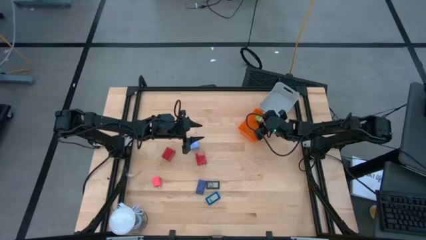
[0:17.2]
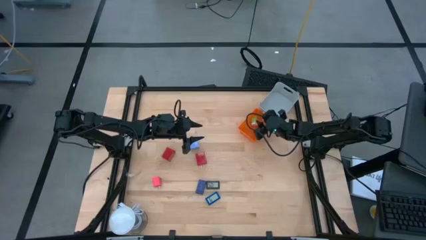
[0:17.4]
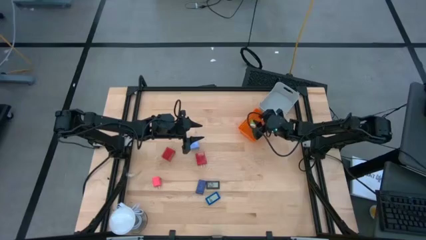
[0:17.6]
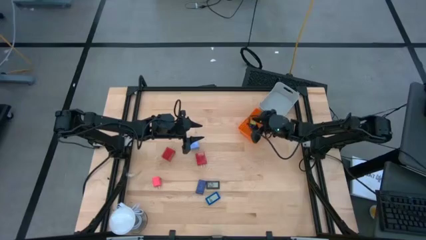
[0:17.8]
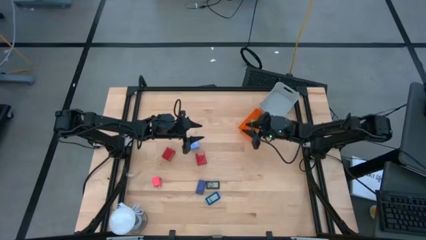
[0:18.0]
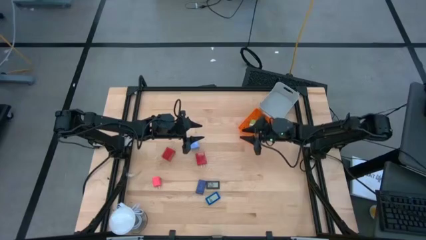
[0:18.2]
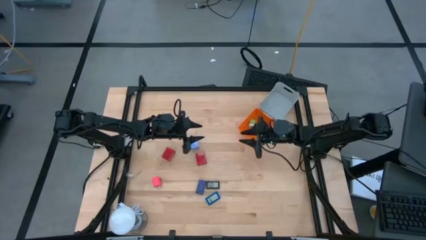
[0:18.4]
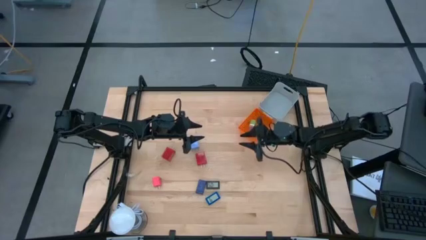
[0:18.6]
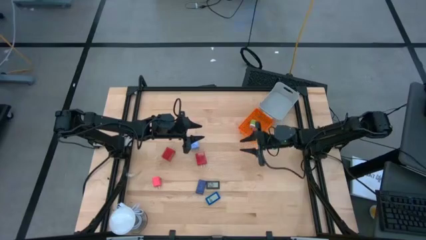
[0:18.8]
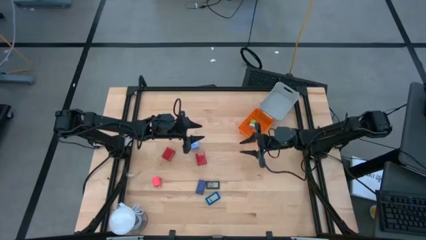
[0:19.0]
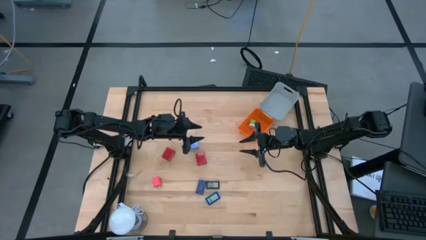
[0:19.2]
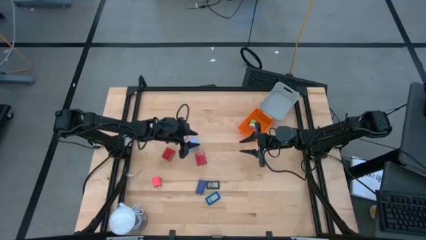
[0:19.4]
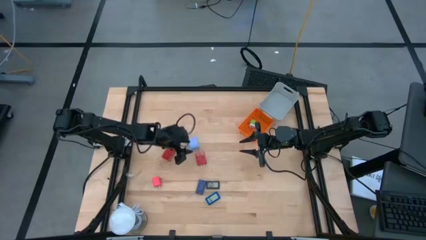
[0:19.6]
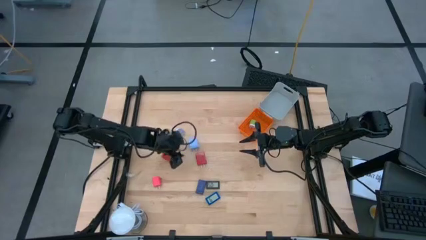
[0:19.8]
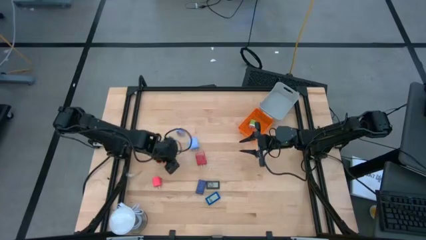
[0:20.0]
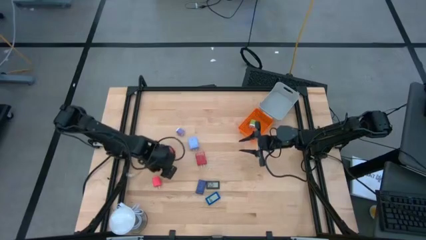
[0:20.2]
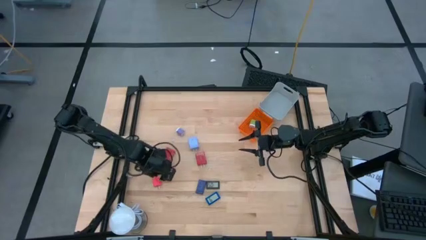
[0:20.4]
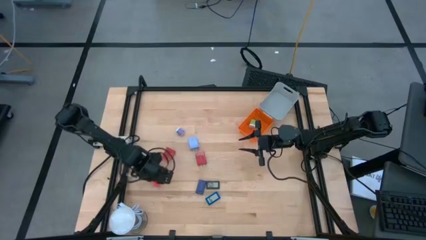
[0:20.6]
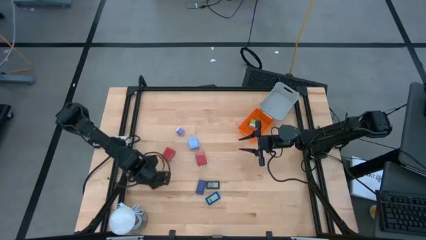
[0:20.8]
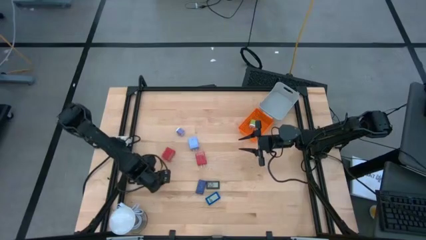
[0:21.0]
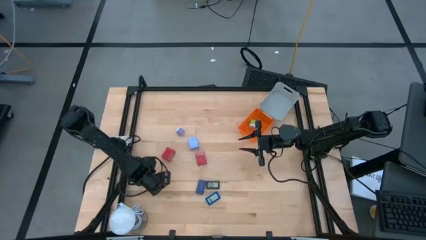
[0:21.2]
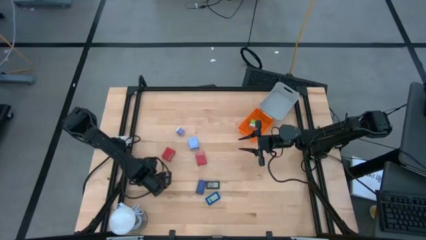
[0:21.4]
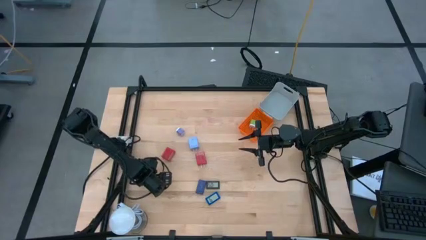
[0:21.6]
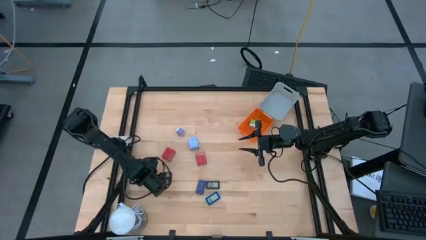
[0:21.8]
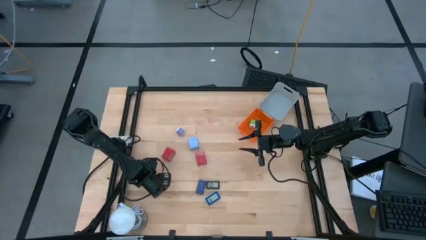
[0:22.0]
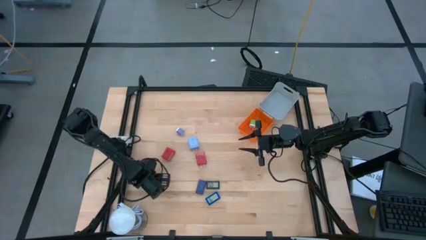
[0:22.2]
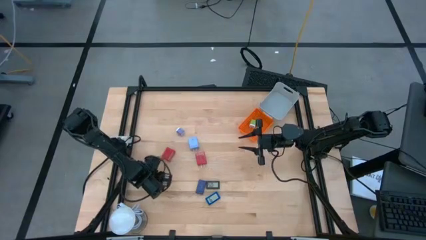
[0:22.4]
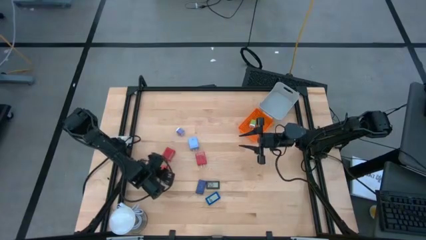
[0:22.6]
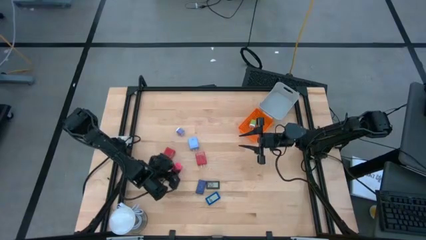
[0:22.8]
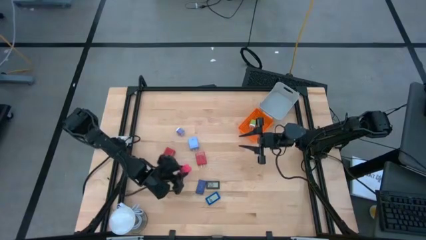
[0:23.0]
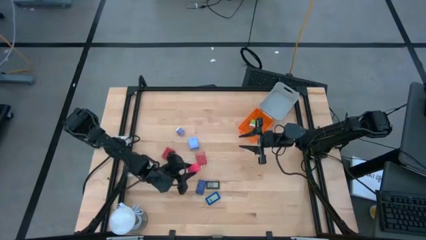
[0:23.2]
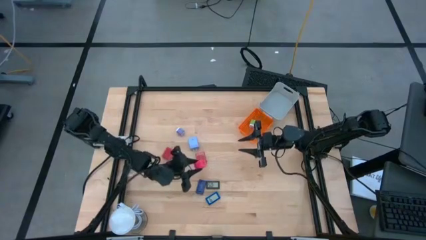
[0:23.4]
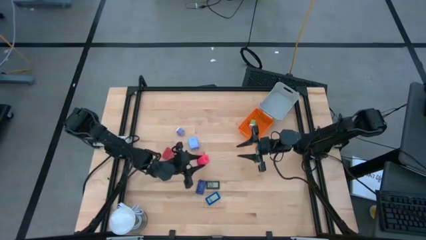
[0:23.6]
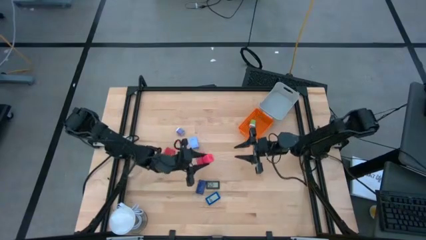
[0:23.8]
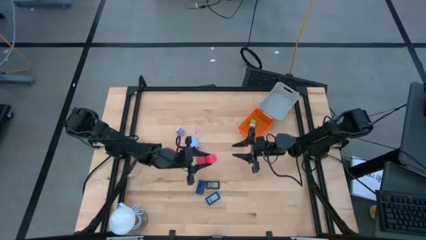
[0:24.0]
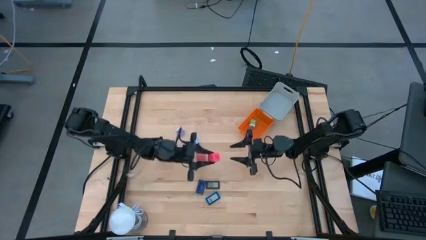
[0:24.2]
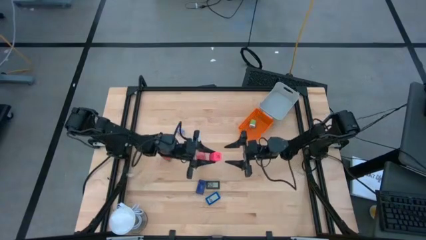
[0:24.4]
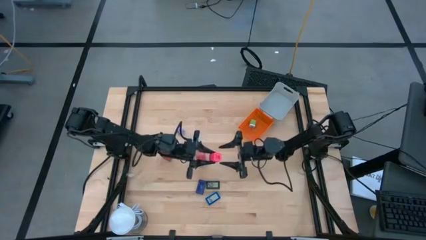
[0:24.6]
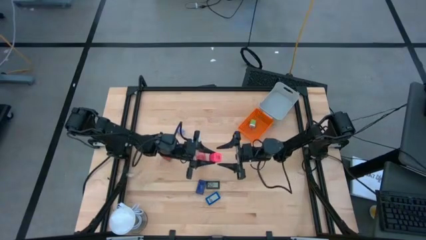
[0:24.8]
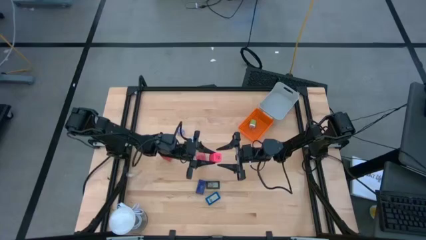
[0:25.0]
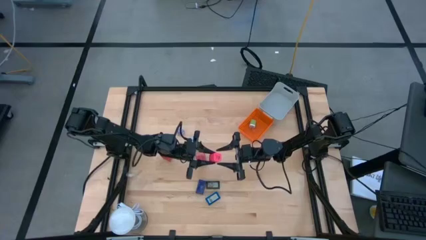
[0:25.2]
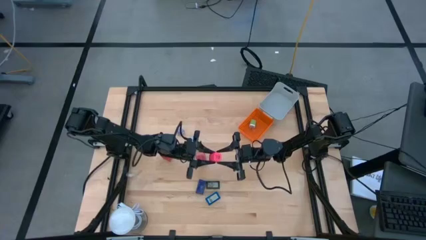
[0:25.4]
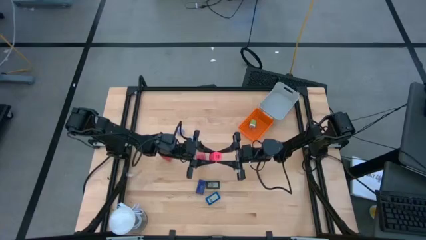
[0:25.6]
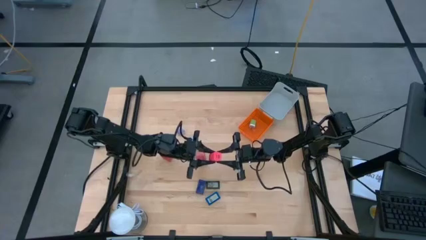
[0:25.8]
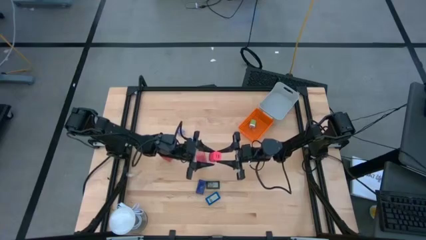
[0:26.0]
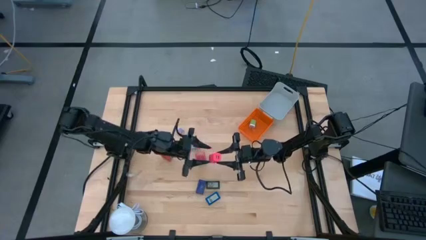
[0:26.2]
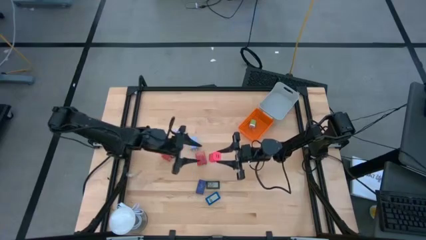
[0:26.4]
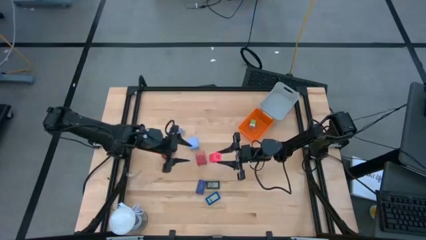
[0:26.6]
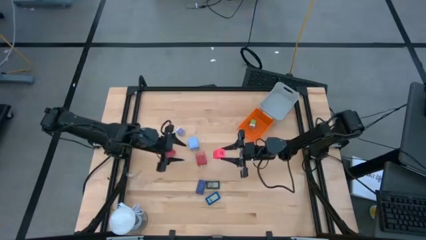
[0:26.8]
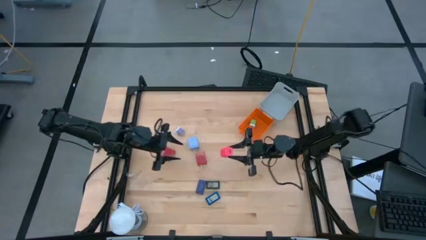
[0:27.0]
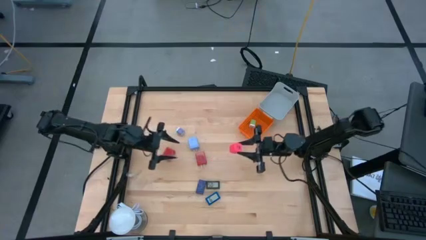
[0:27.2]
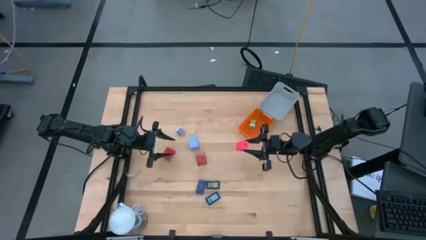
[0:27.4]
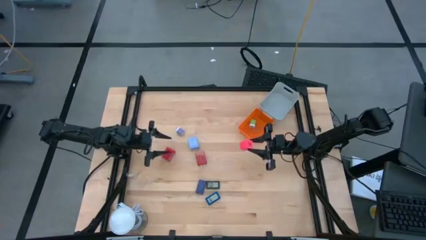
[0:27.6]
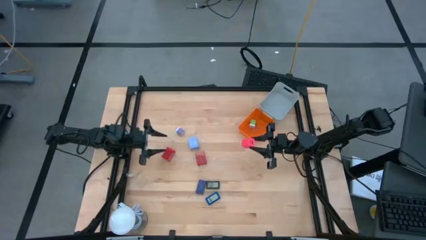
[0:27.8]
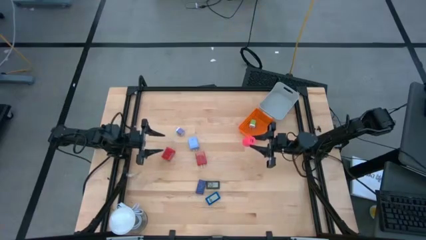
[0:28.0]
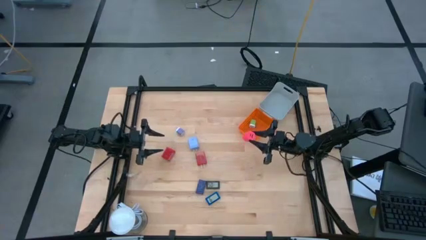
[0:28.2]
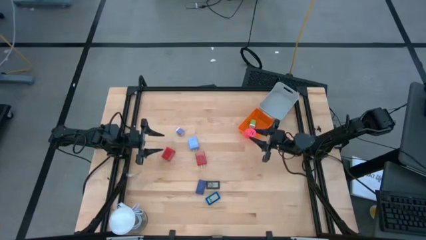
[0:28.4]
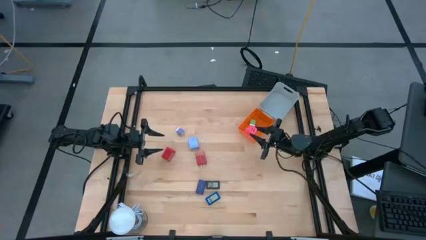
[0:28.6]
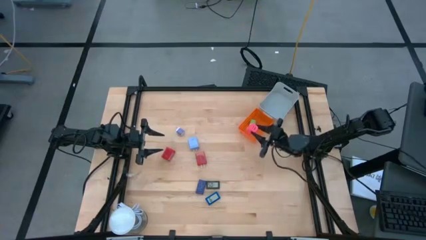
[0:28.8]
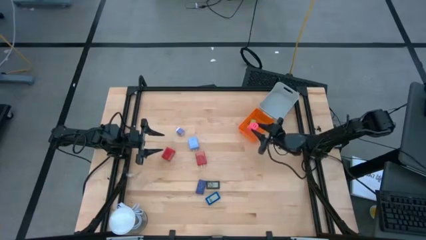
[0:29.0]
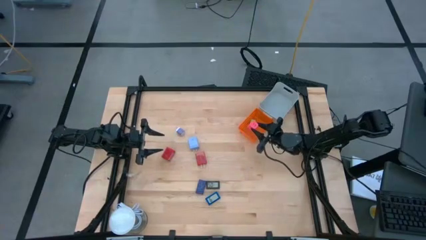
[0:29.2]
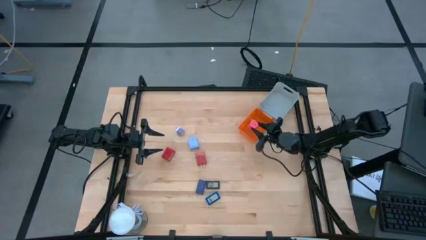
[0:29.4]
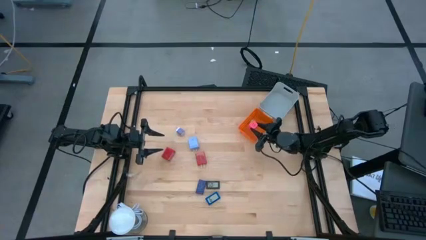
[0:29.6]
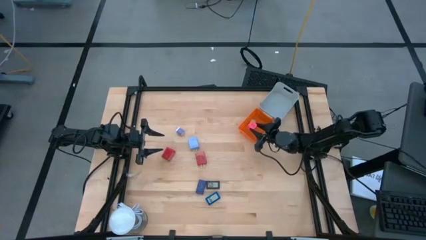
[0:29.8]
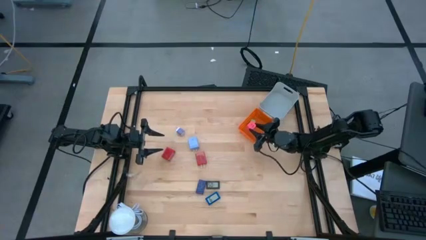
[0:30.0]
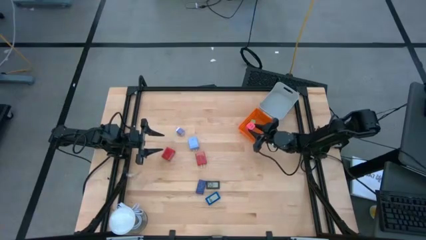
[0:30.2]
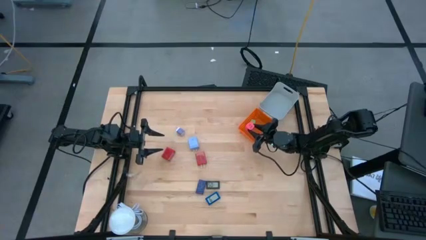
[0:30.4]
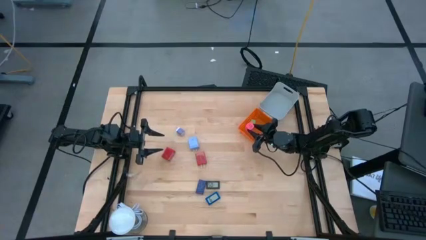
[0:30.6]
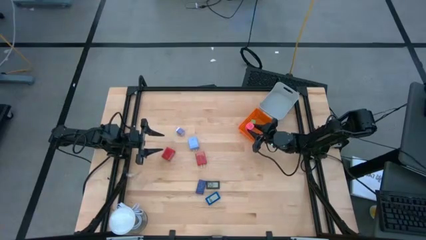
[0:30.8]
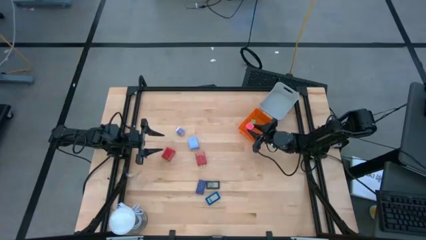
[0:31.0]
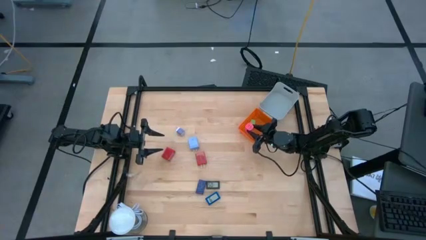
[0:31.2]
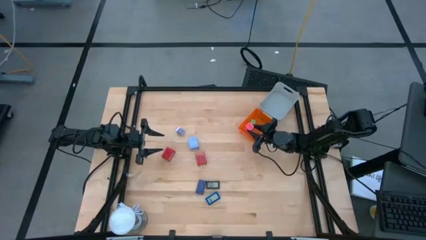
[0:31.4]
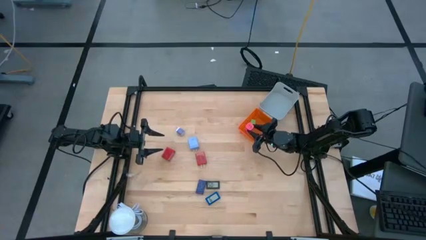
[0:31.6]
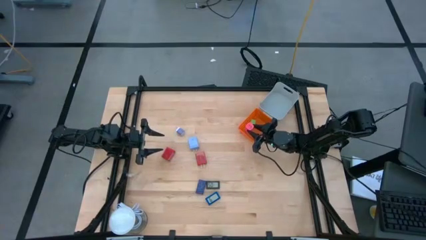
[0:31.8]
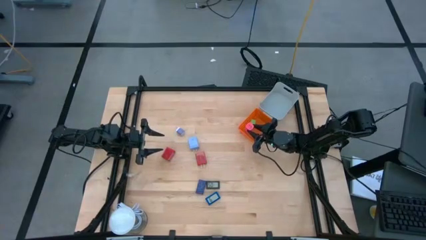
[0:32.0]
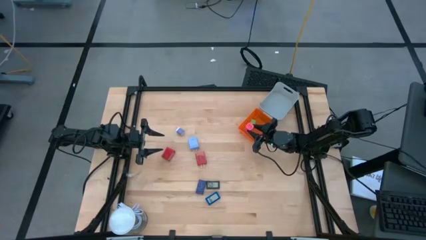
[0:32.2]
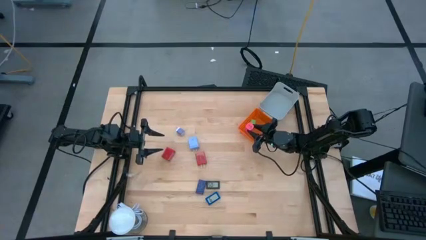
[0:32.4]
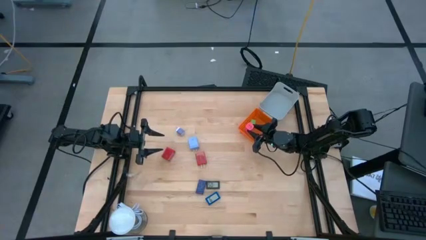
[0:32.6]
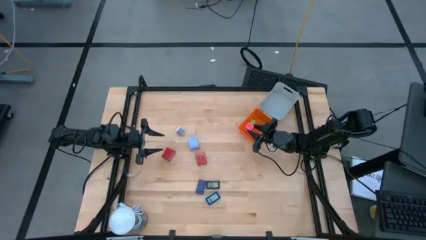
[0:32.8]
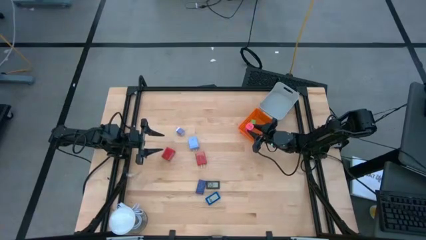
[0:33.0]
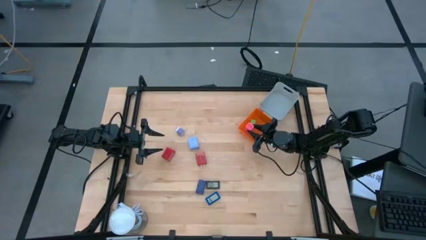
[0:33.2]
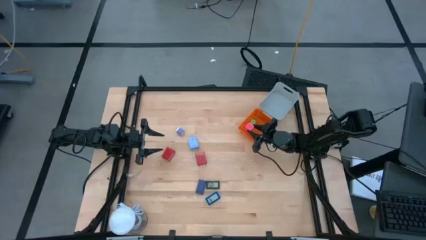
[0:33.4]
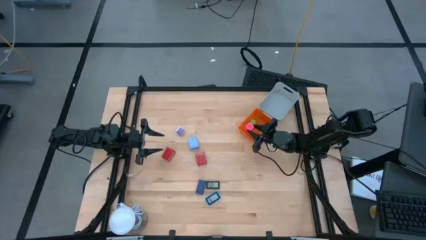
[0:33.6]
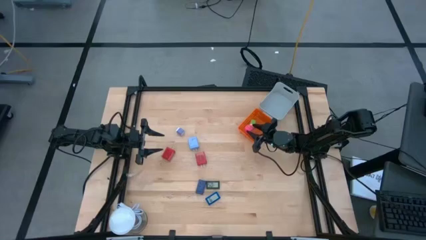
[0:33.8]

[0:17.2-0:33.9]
Task: Pick & Place Office items
Put the pink charger adapter into the orange bin
